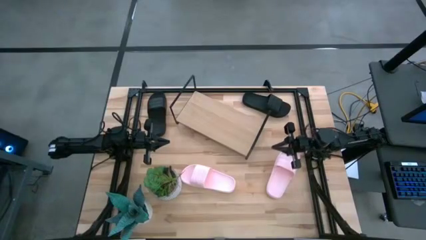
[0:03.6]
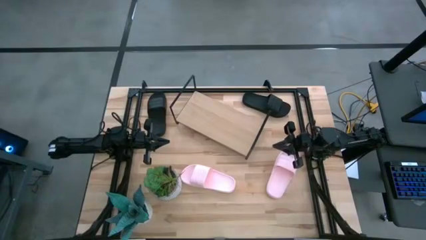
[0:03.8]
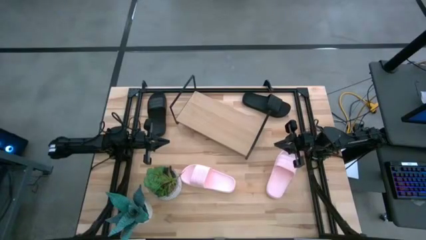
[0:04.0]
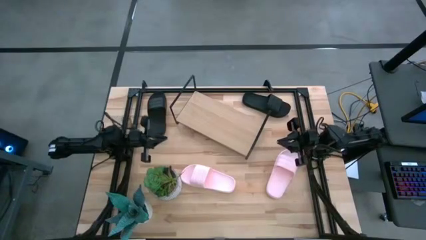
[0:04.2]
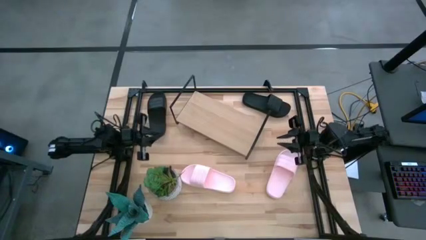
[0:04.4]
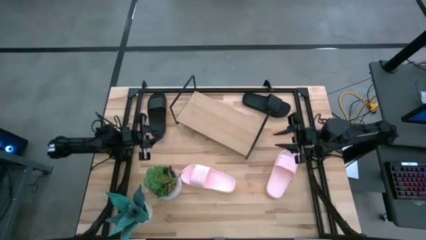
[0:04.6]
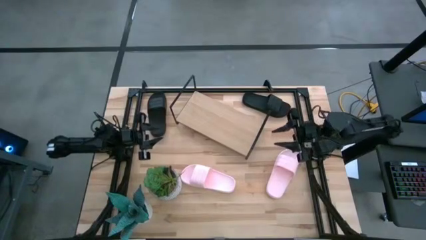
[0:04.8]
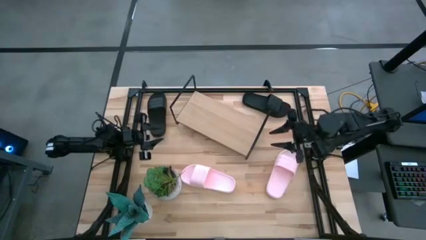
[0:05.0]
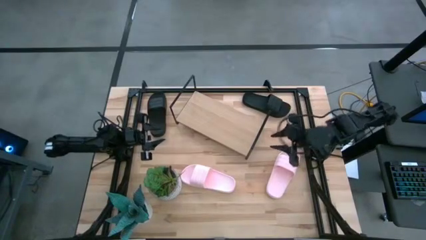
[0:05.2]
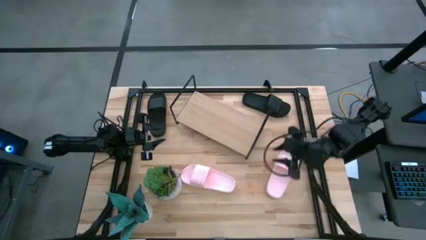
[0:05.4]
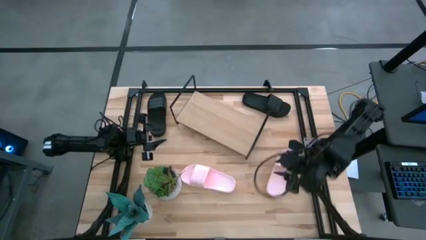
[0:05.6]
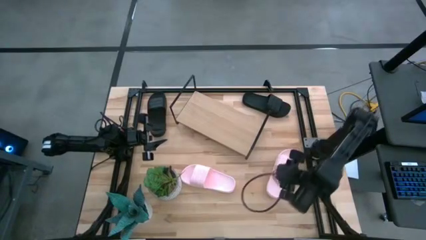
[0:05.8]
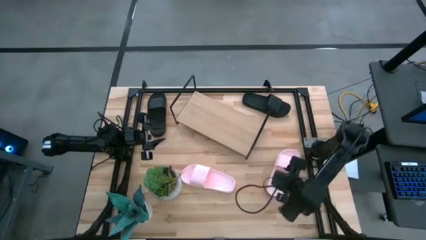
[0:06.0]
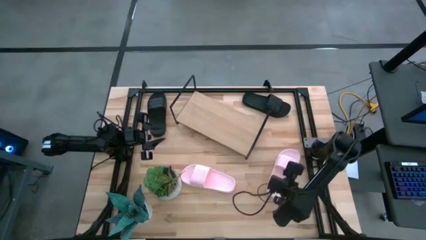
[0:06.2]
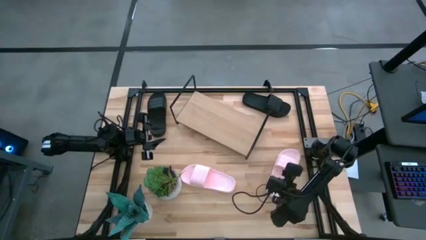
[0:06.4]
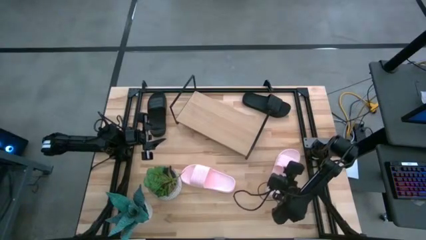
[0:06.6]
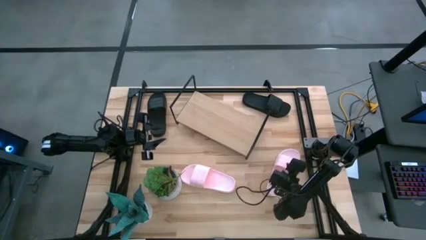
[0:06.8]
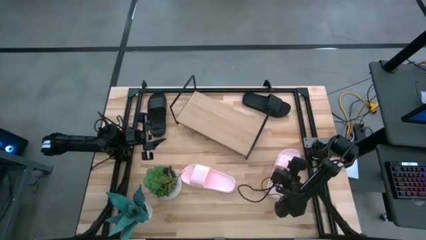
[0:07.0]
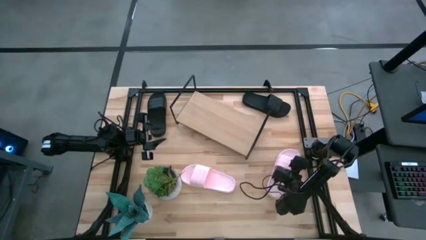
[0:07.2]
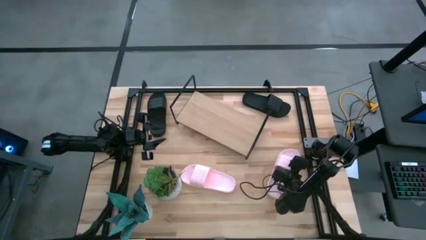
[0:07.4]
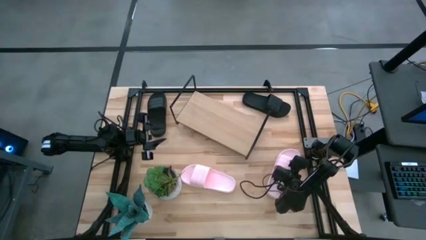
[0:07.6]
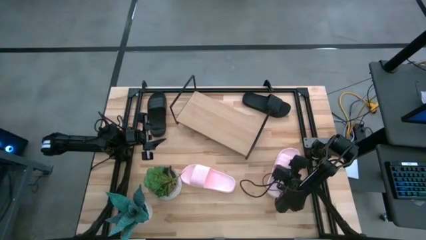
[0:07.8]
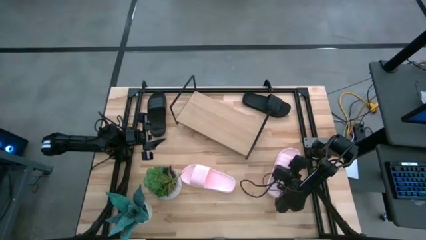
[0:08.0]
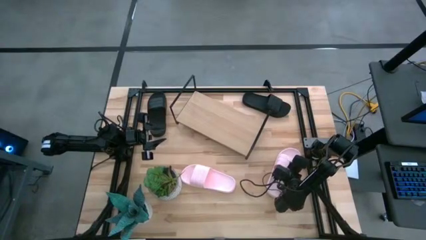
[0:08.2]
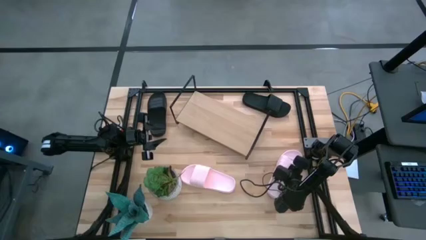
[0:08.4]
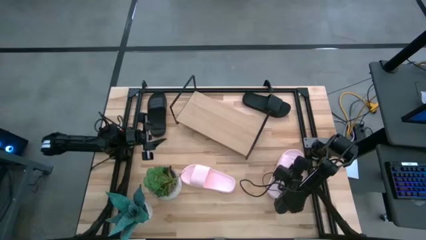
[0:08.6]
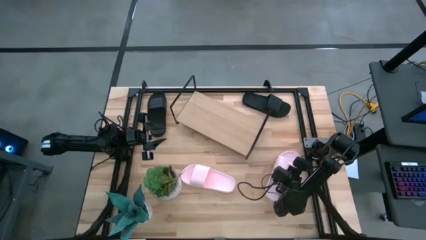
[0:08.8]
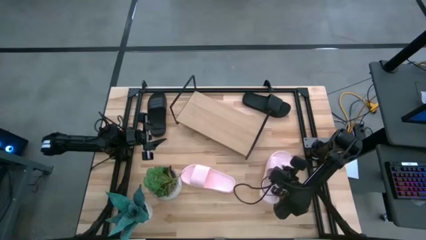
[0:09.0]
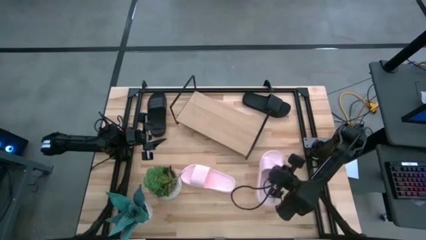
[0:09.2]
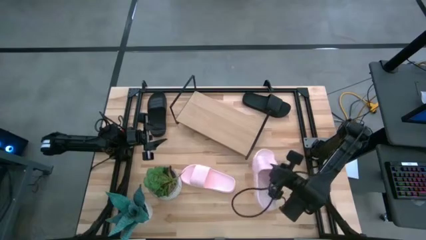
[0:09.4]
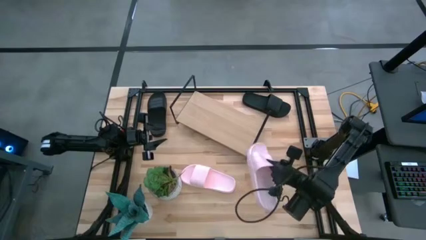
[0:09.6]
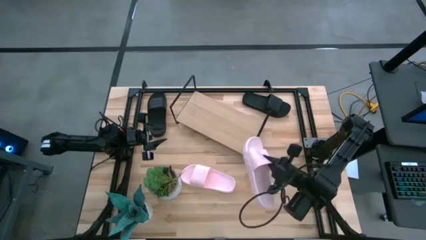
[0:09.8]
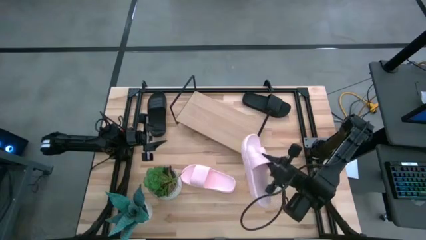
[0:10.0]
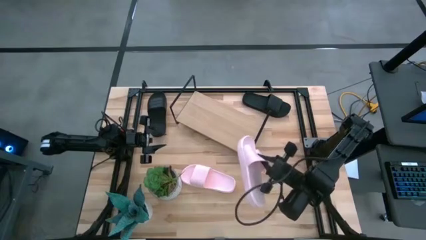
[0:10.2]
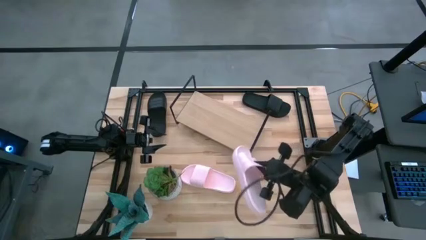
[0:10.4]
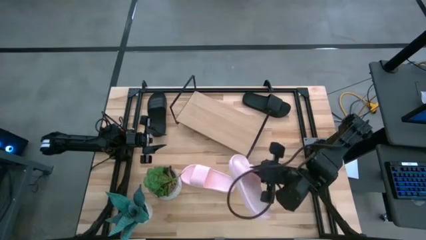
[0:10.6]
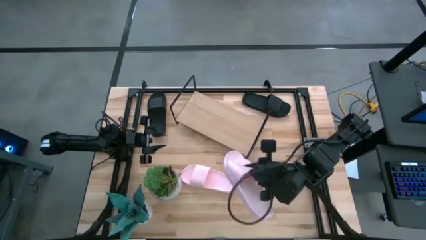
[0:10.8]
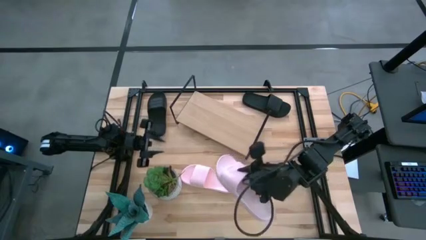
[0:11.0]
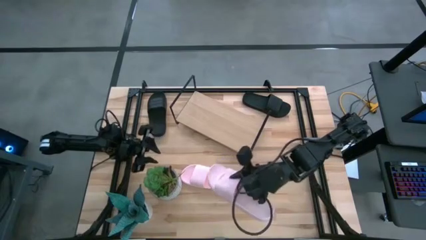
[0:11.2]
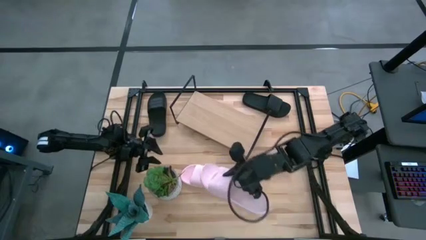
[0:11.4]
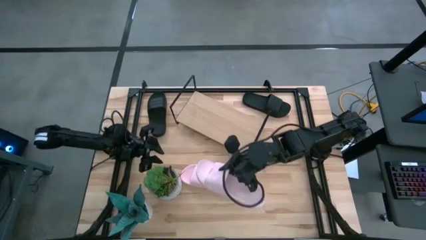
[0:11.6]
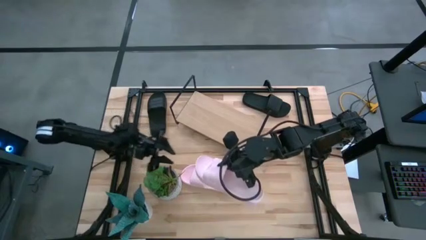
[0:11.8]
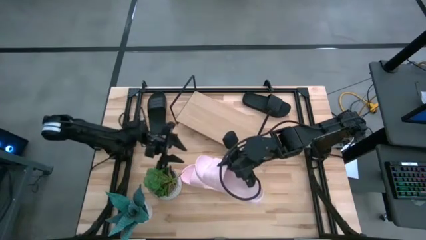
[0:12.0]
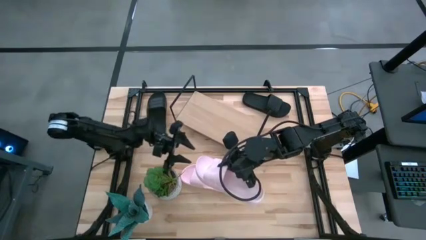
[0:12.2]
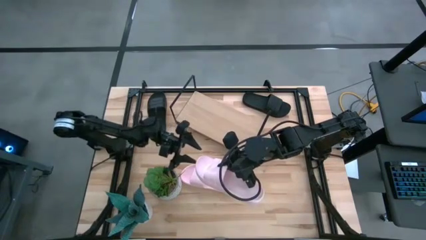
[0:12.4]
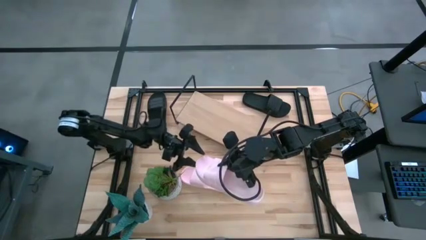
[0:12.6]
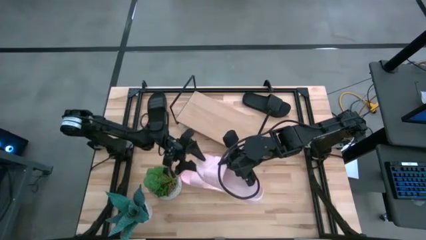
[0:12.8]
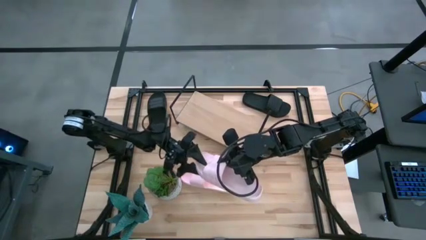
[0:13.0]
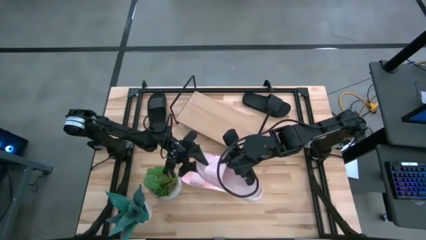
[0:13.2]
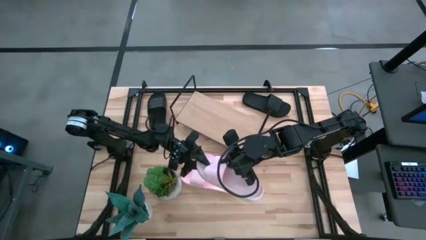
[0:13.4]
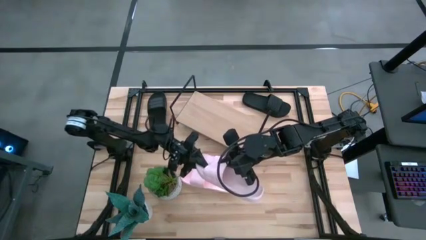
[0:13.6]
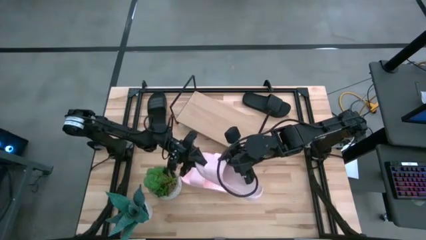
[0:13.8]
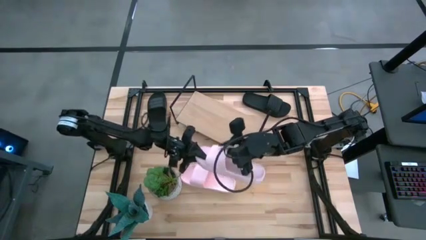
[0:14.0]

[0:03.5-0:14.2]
Task: Pick and place slides into the shelf
Put the right pink slide on the shelf

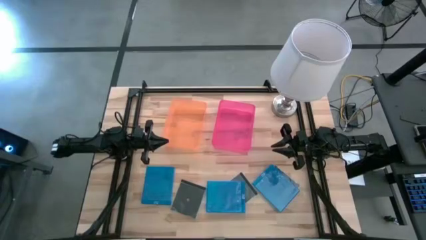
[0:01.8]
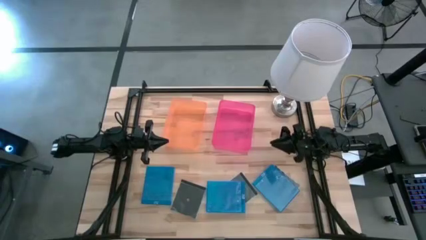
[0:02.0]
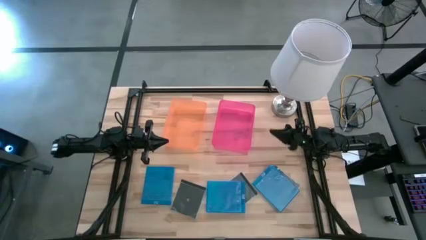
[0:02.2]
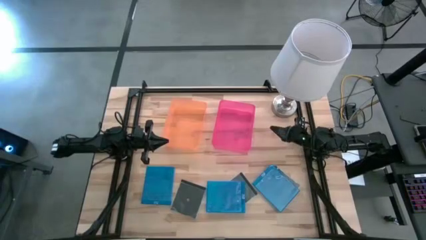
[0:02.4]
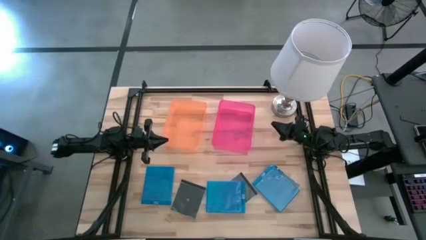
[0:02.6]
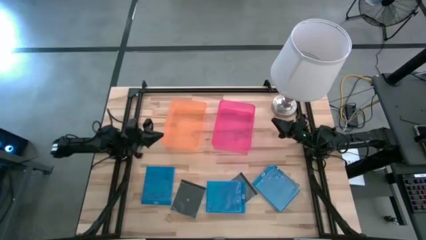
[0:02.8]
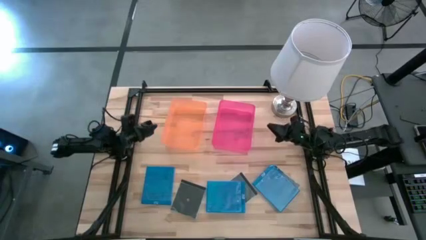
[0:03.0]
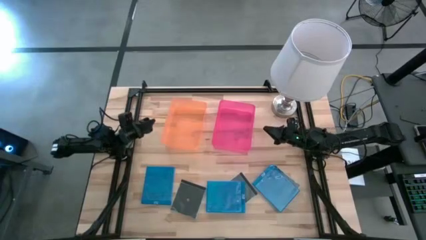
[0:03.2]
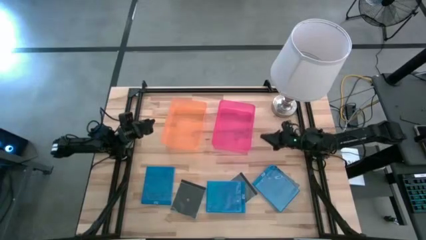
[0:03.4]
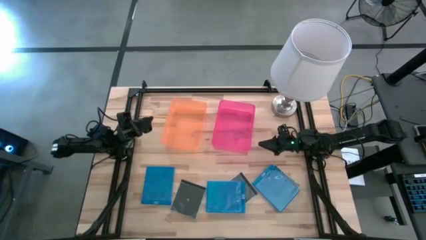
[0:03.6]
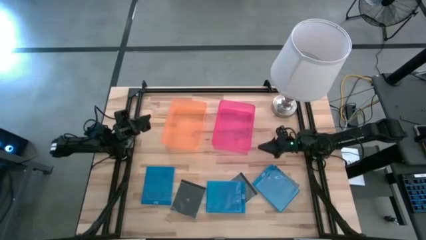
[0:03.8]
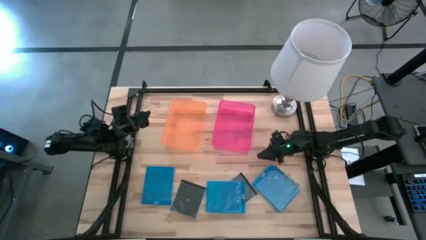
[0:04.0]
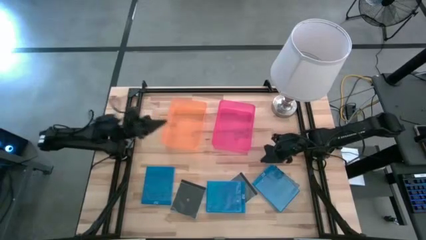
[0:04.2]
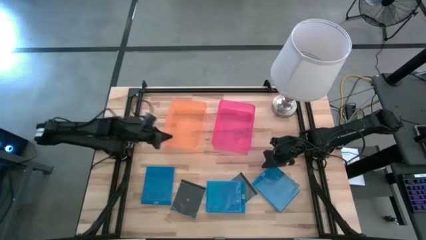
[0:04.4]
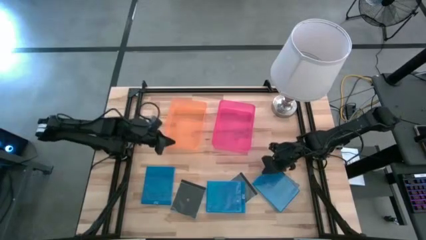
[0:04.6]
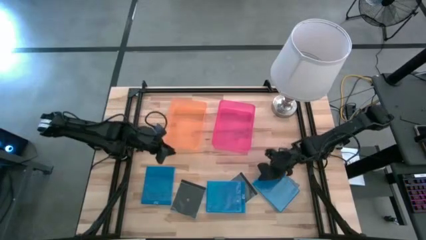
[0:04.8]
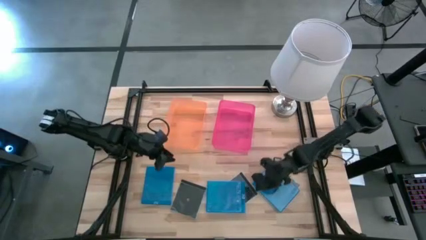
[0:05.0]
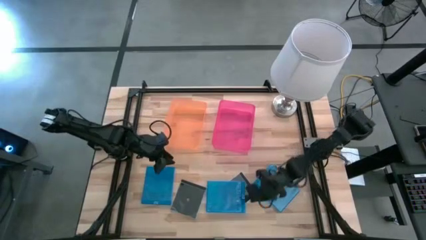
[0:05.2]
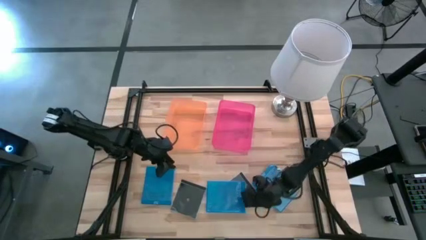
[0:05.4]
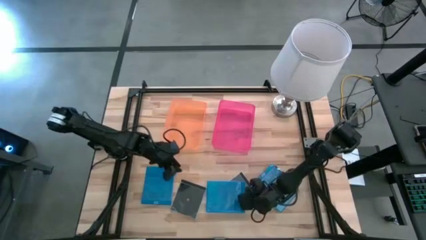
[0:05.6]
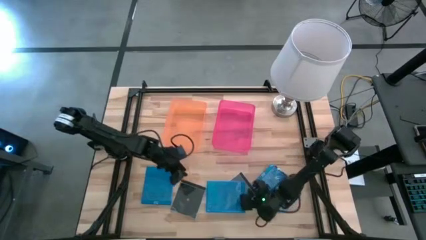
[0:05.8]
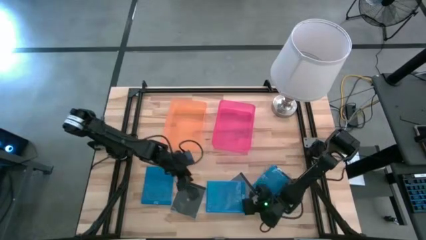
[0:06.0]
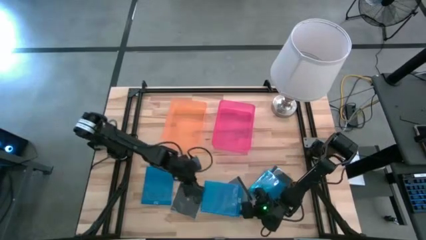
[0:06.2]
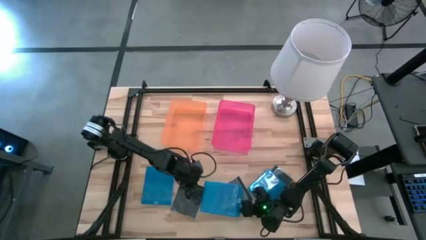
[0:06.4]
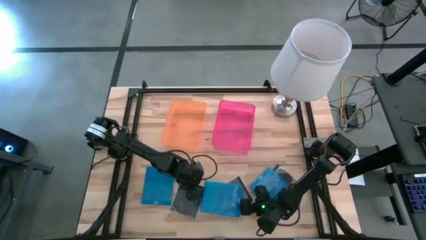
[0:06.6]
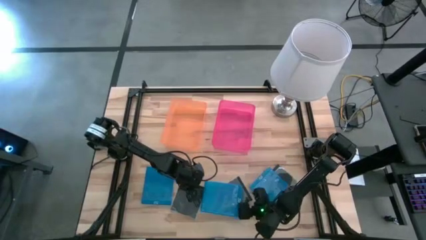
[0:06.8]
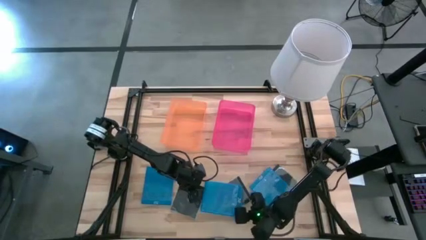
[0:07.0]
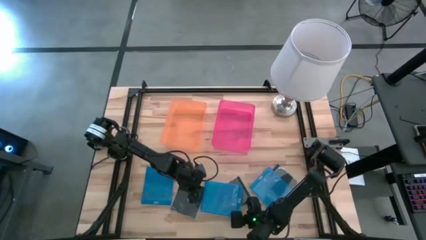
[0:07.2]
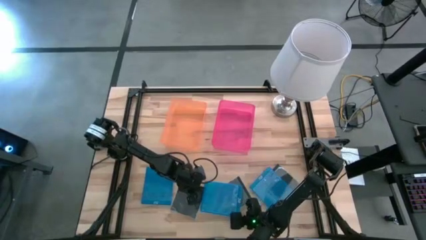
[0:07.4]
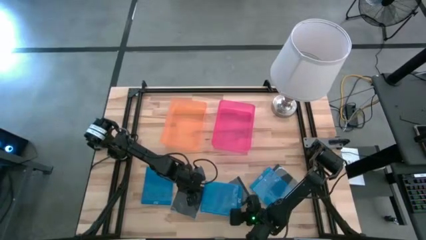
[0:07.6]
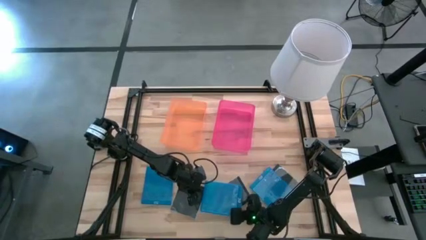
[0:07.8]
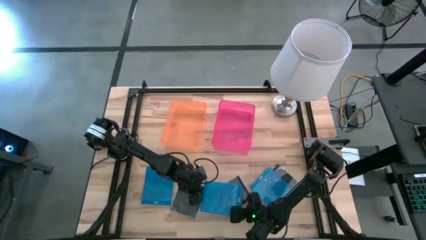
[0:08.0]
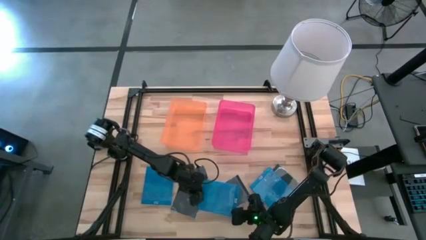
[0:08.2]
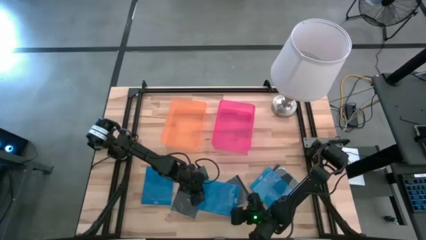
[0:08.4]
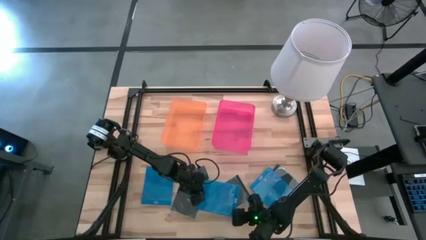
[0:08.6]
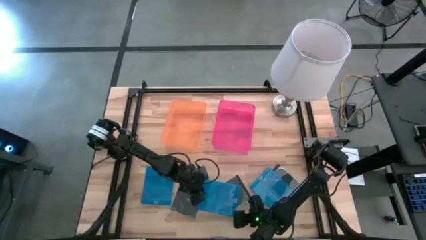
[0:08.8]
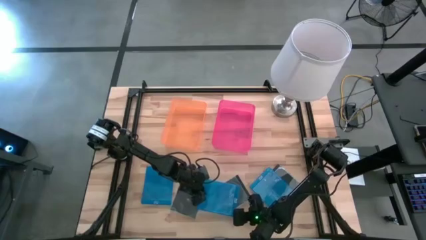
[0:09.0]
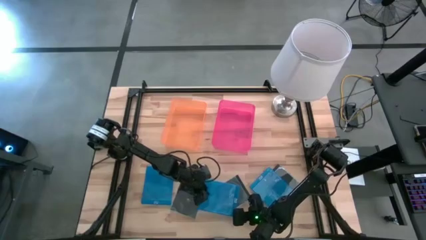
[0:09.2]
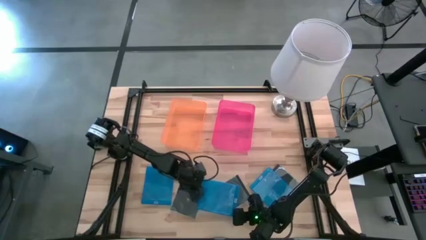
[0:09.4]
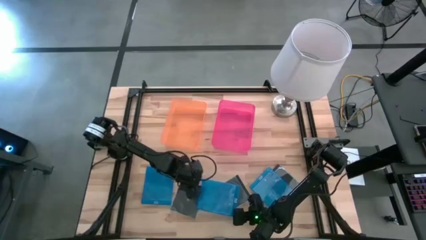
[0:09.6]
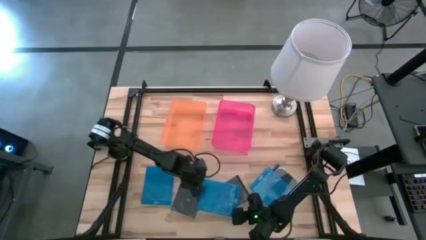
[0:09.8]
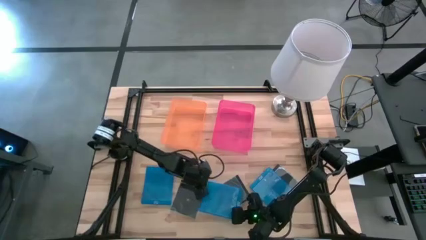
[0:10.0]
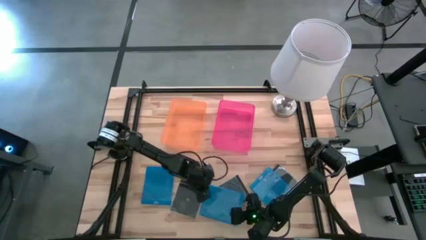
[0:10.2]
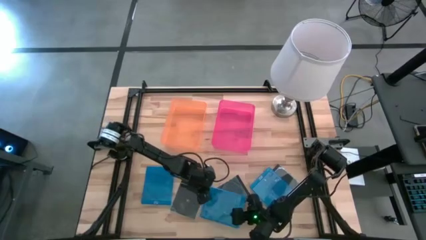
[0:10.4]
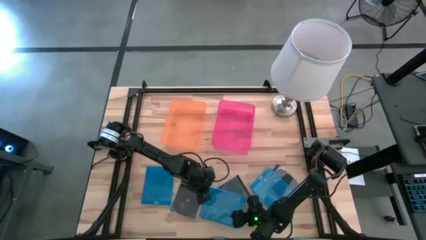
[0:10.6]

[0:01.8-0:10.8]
Task: Pick & place jewel cases by type
Put the middle blue CD case into the pink bin
